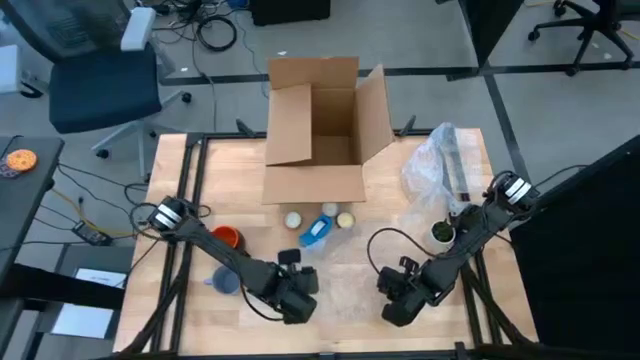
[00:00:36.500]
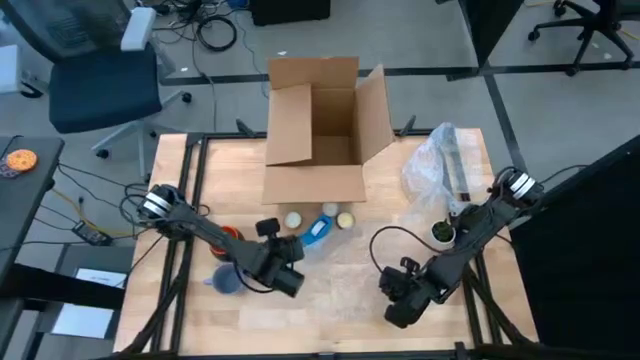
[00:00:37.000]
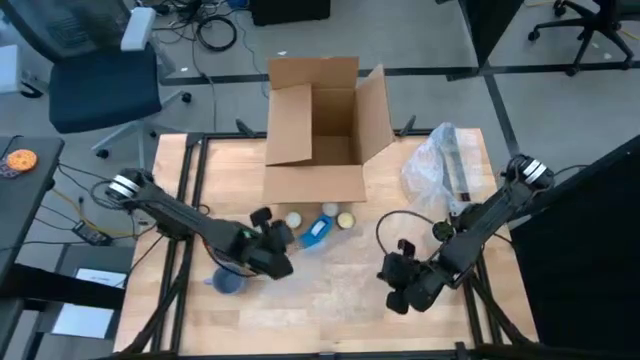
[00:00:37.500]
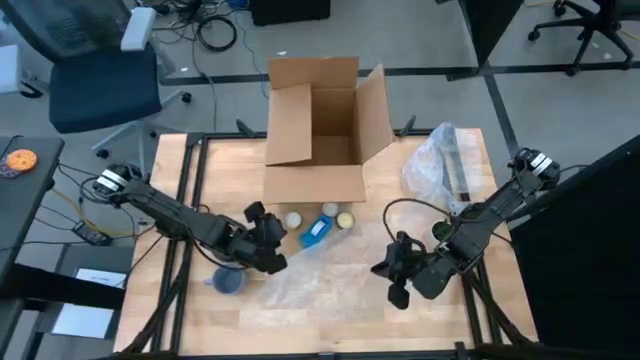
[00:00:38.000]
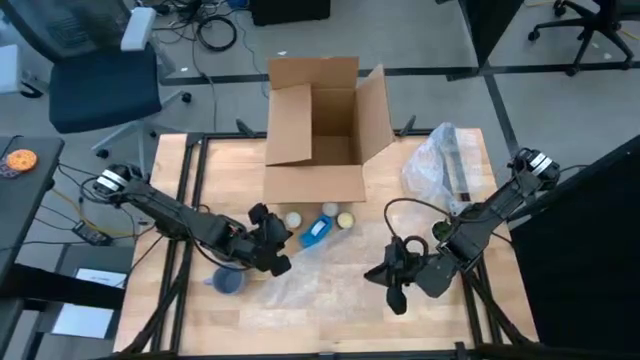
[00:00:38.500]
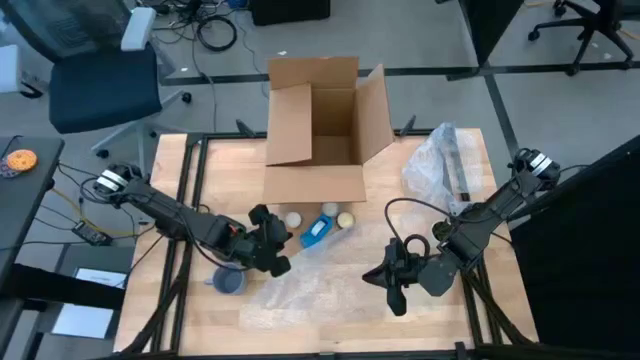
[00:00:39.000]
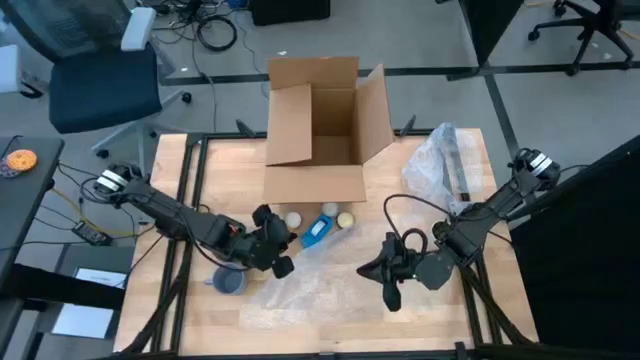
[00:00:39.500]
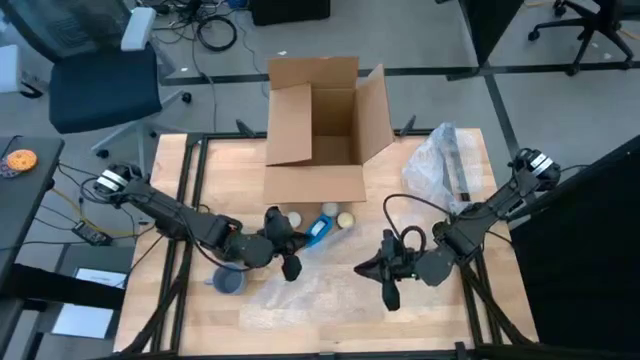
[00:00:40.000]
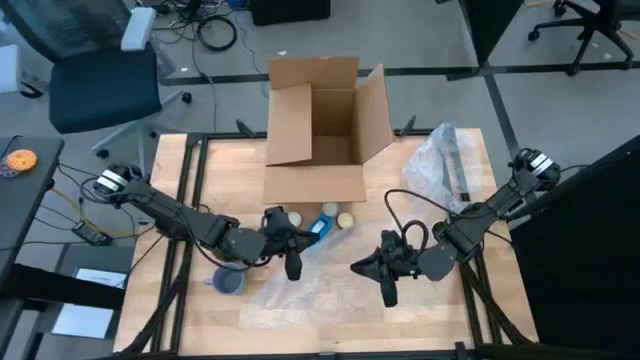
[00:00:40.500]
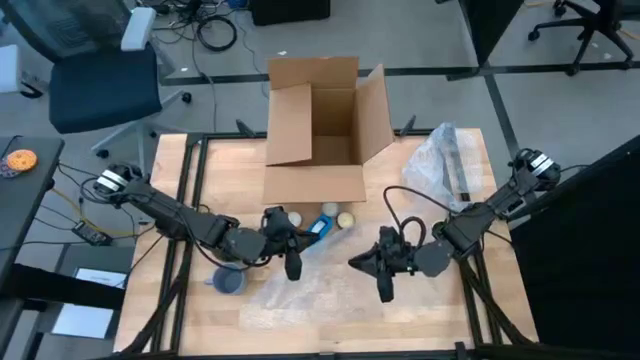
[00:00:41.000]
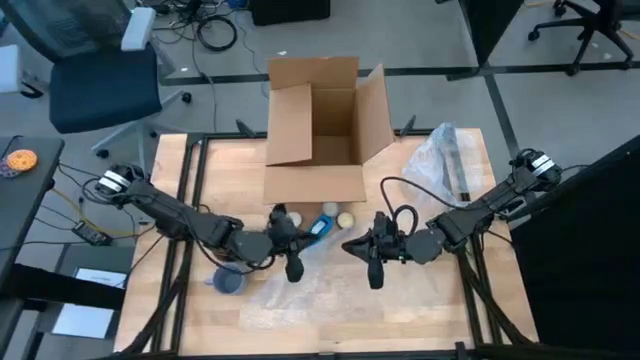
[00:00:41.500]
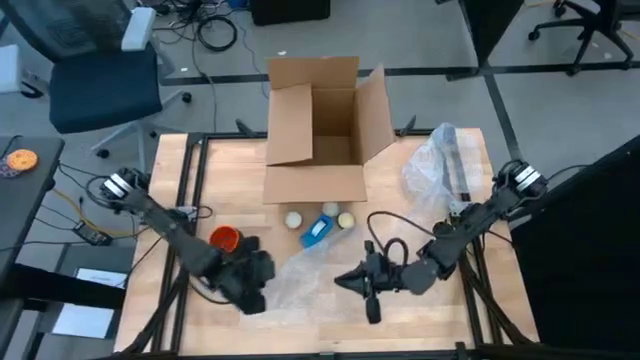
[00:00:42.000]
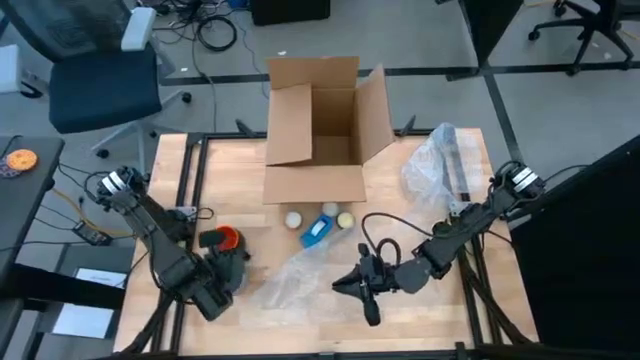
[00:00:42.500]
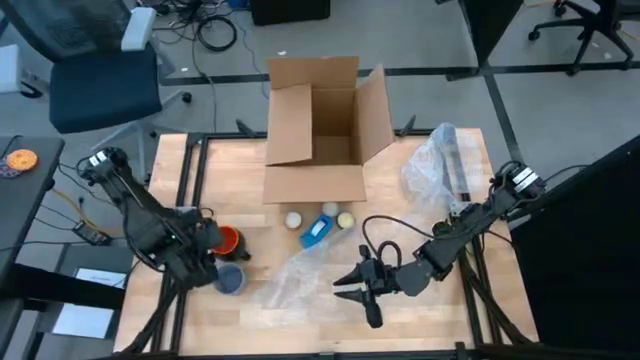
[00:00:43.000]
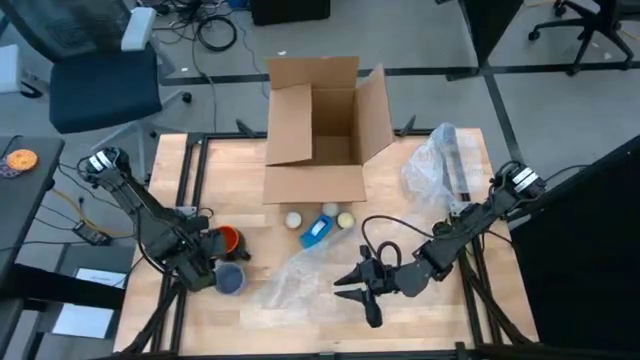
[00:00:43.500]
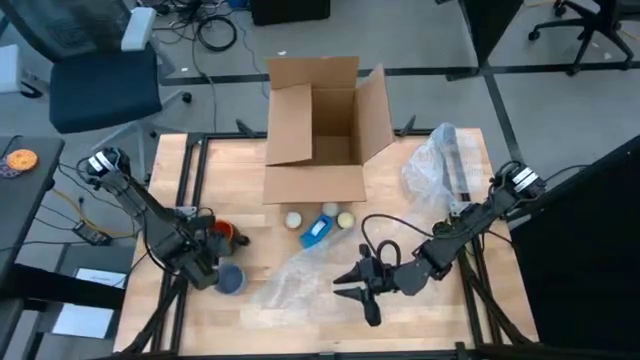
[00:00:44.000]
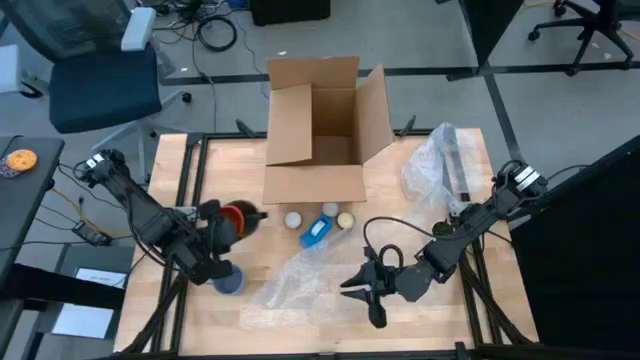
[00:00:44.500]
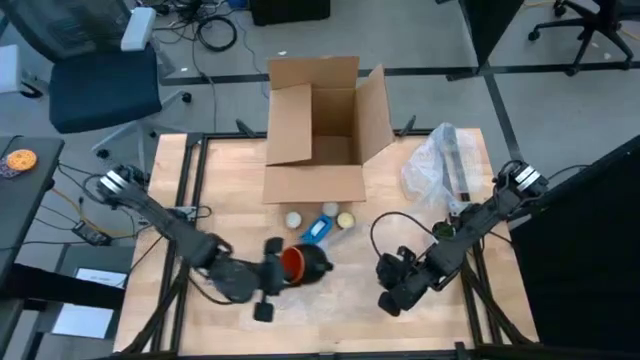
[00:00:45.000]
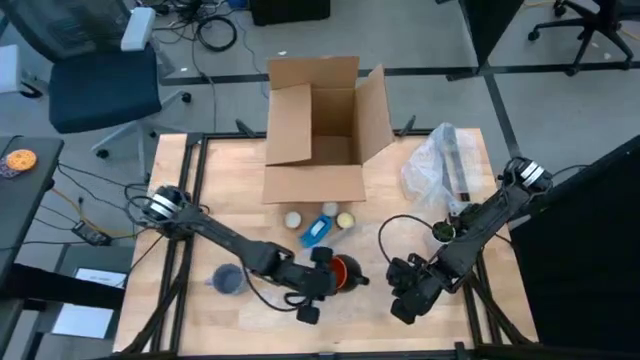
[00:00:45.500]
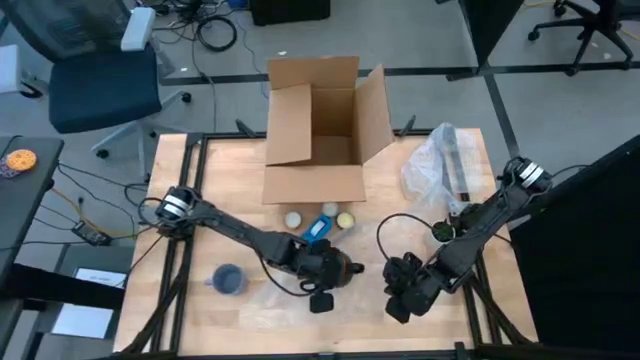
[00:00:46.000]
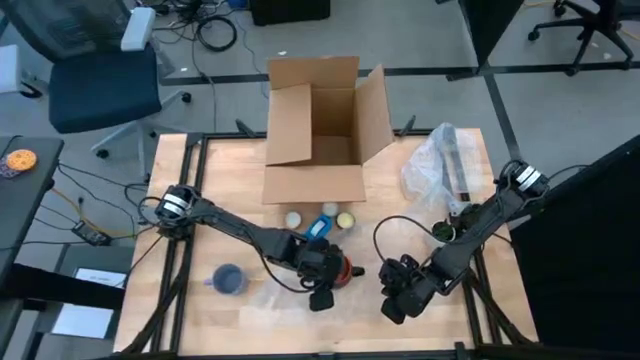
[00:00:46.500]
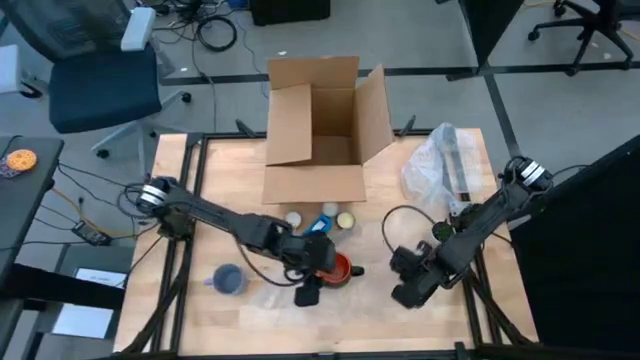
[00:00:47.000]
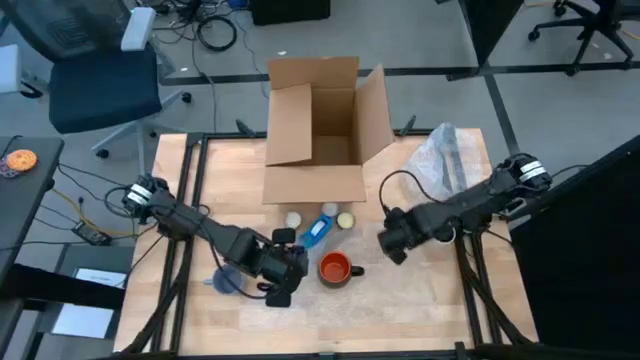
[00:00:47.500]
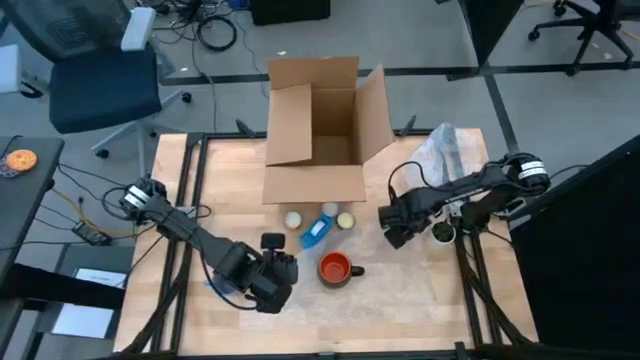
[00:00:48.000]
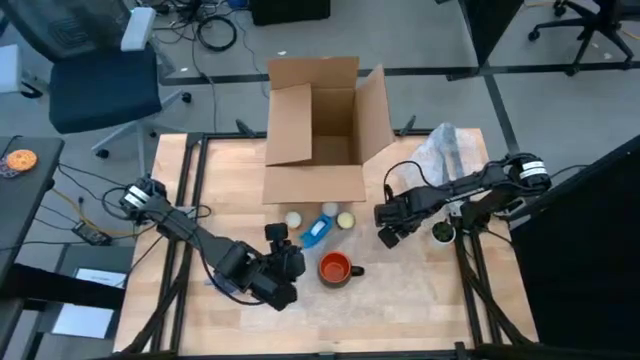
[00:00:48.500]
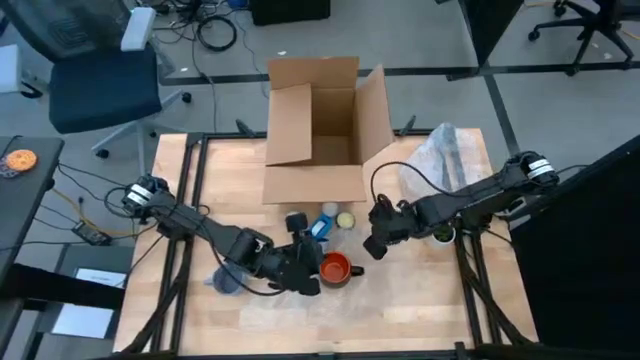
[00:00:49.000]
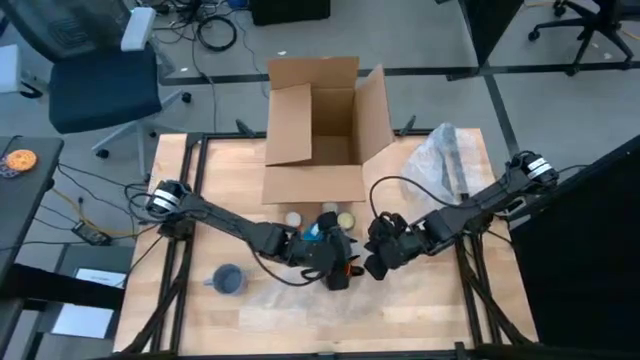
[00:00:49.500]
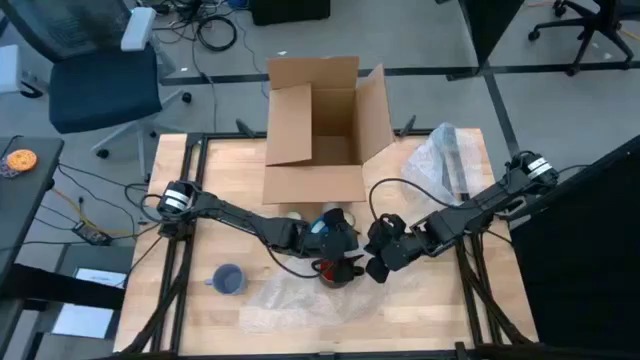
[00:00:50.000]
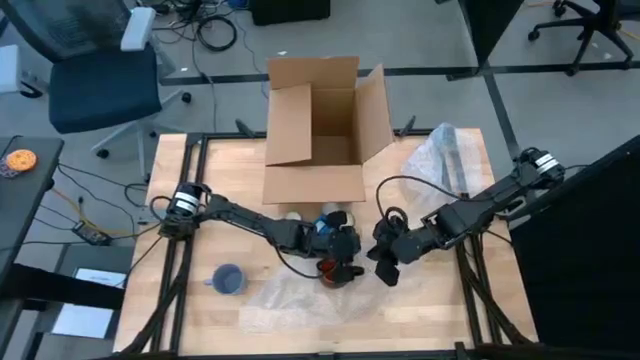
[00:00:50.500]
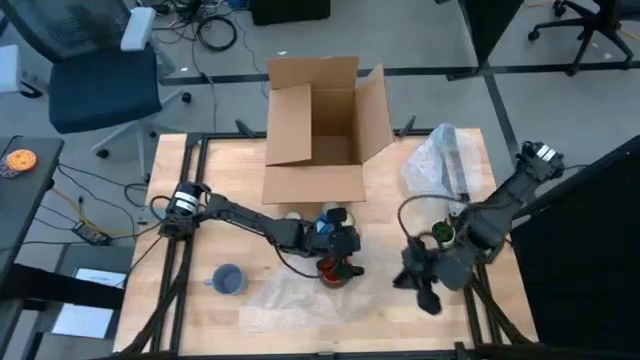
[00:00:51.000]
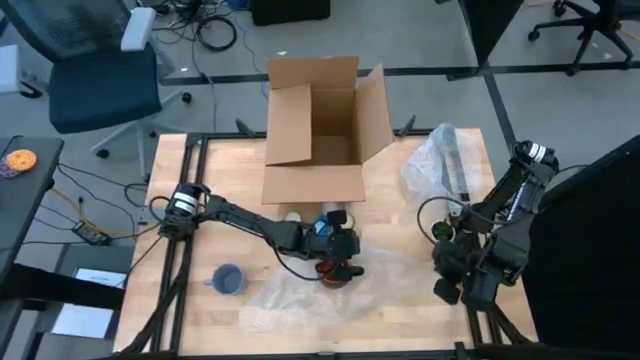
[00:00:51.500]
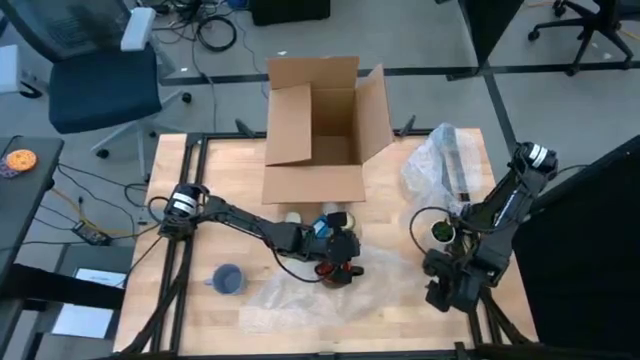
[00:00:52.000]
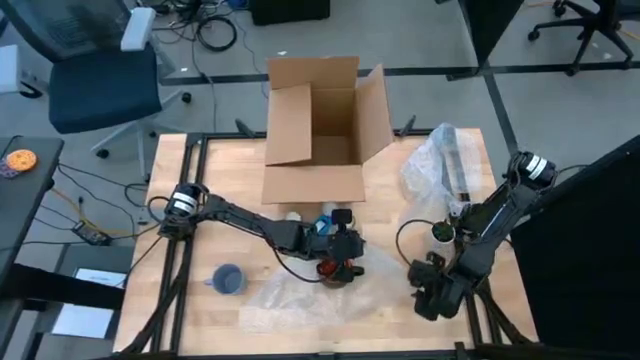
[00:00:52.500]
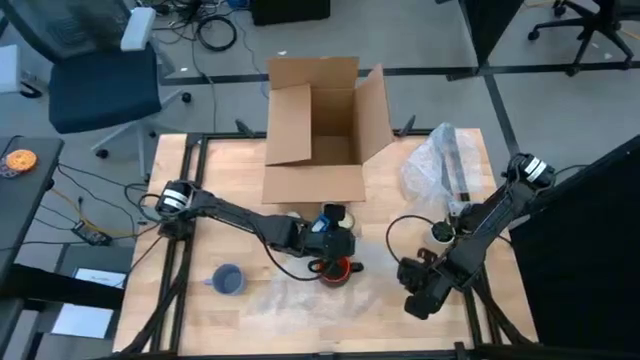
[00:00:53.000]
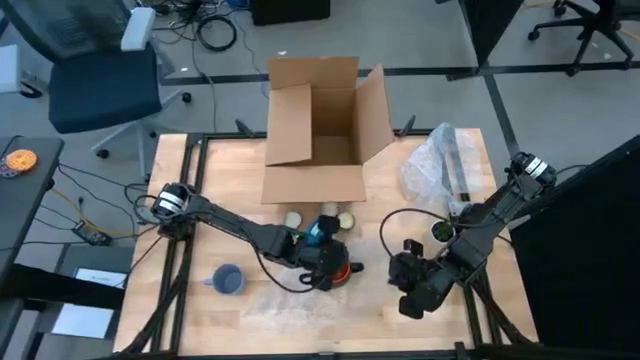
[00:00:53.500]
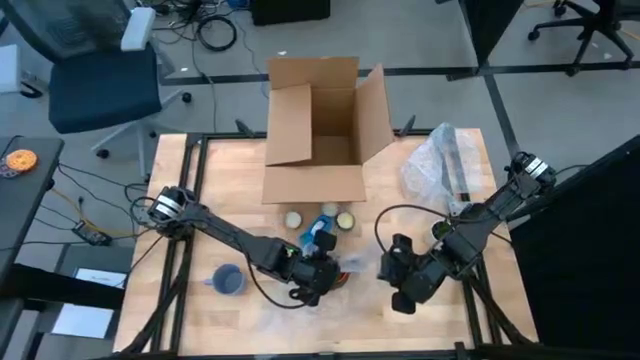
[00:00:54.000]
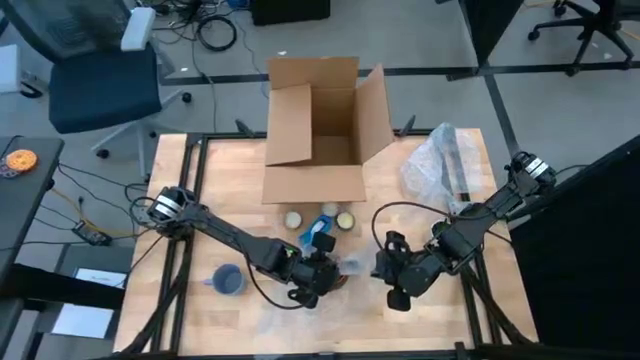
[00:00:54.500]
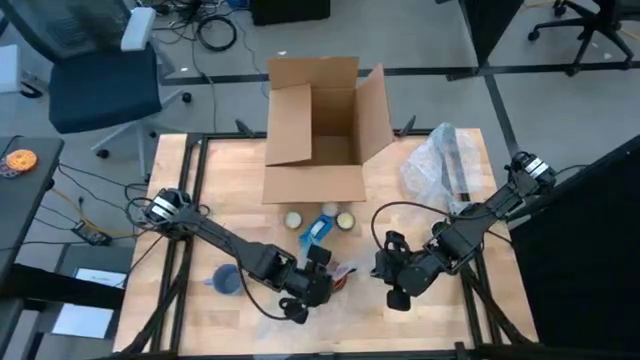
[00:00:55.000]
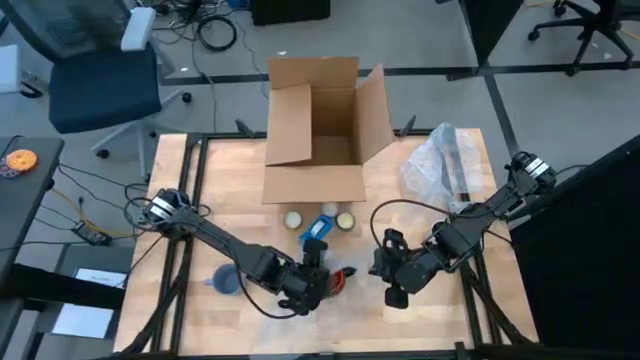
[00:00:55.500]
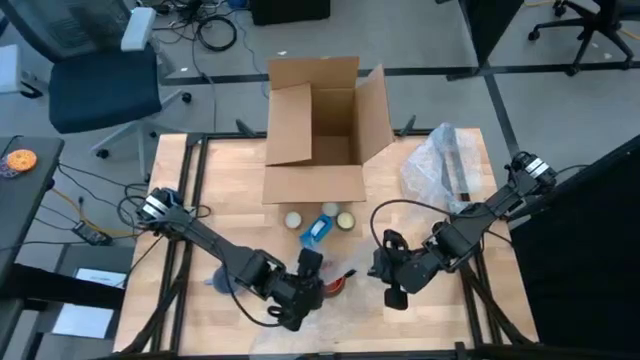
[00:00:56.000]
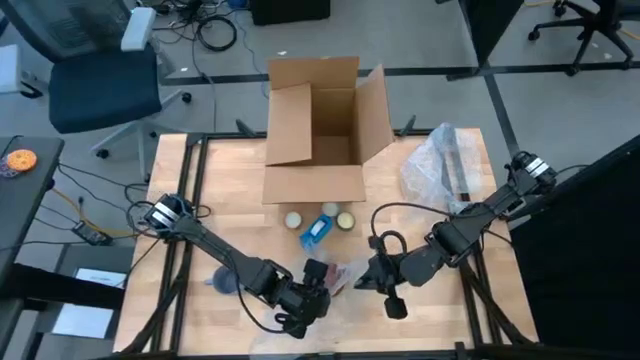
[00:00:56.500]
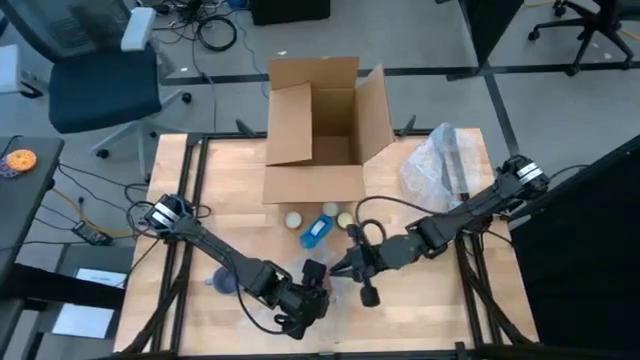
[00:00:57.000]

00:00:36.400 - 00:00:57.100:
Task: wrap mug
Wrap the black mug with the bubble wrap
